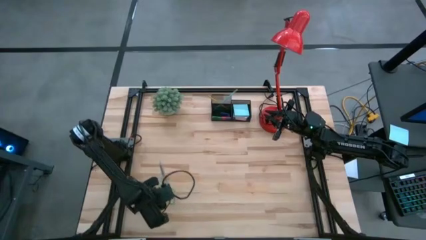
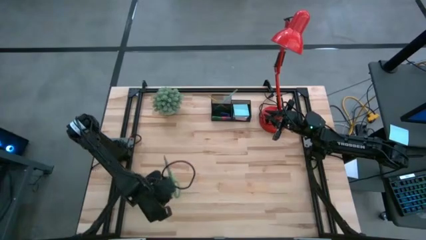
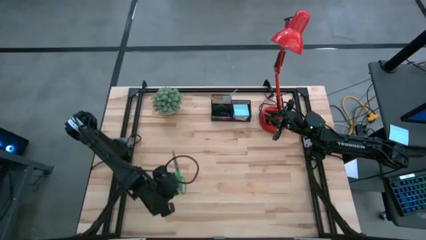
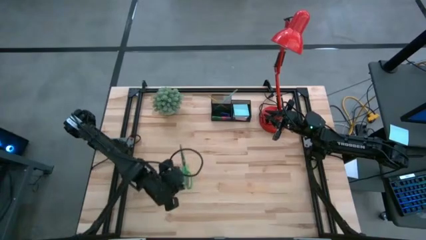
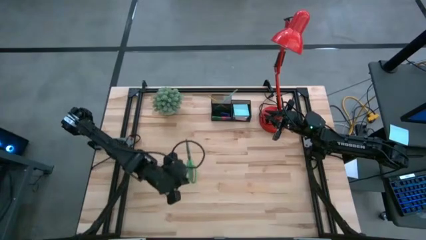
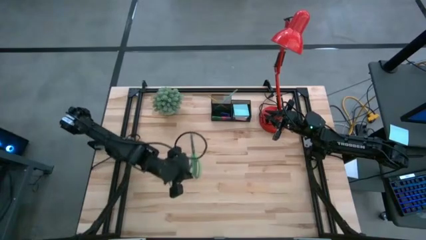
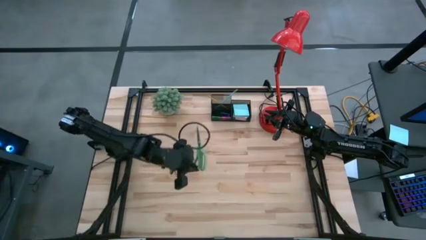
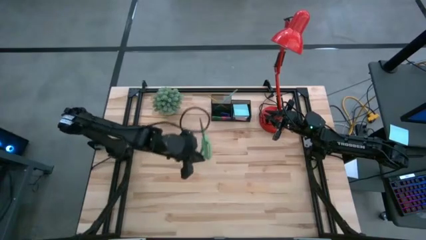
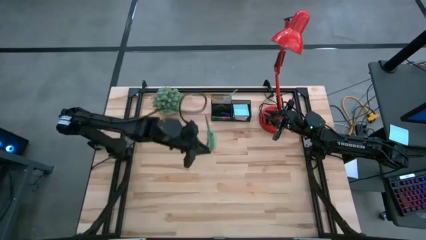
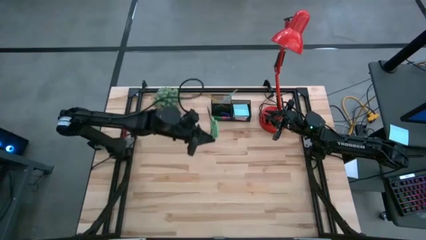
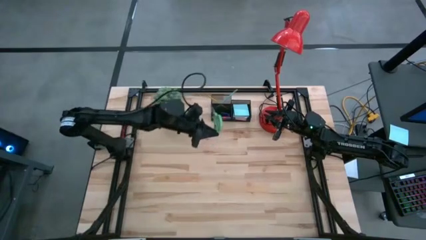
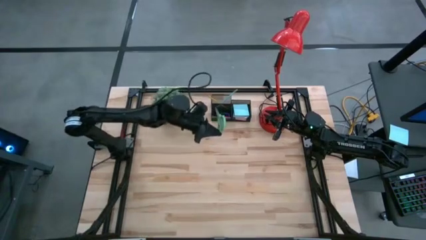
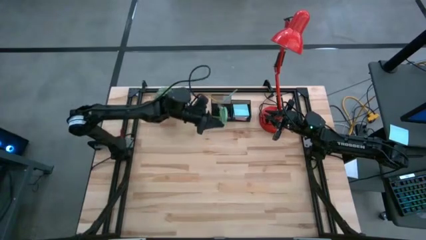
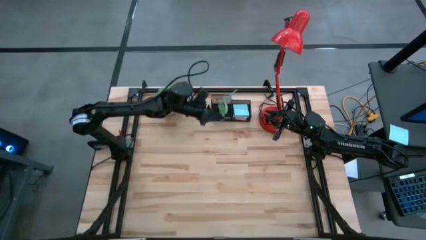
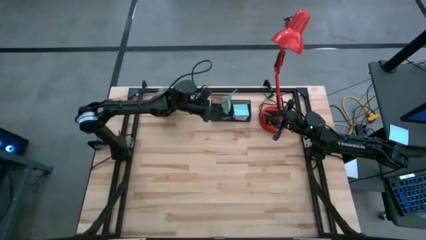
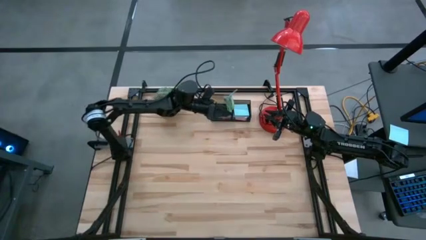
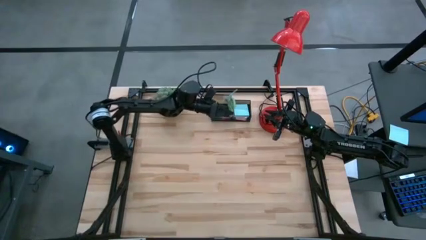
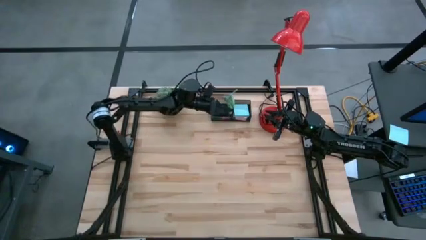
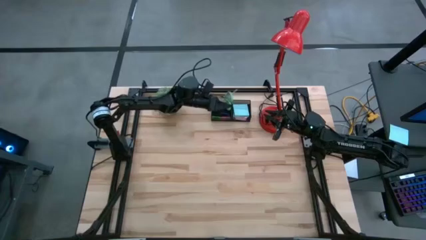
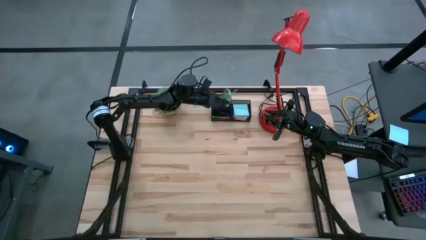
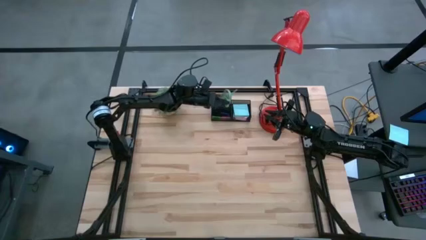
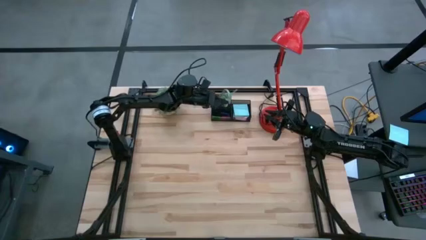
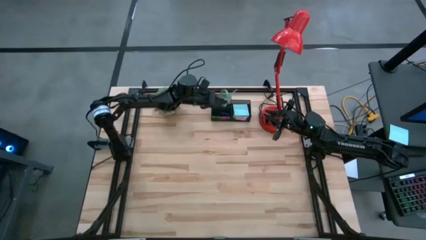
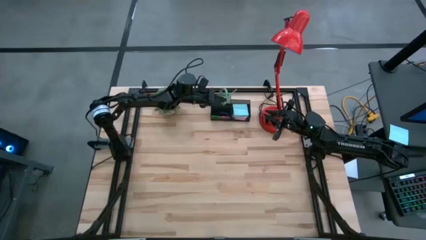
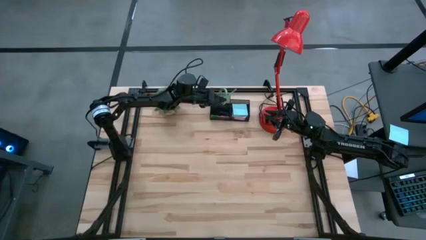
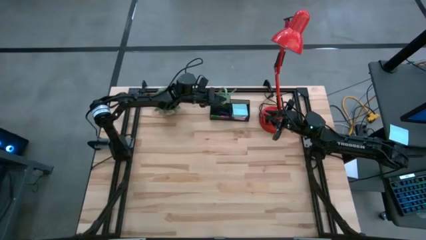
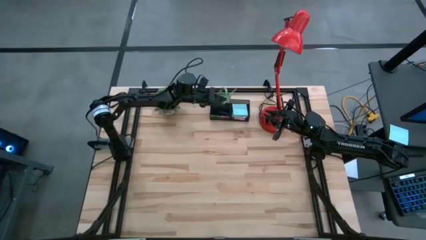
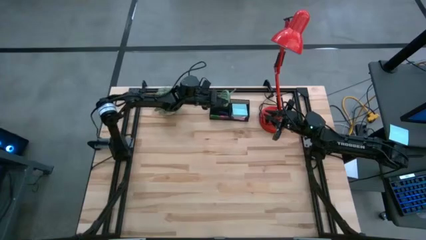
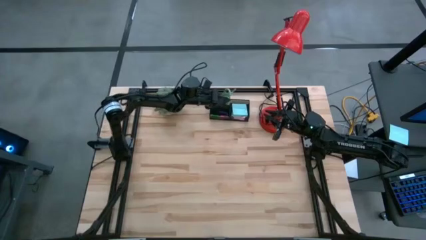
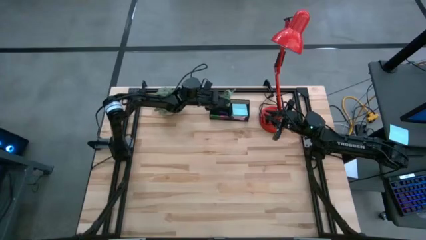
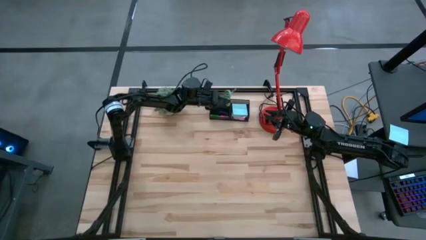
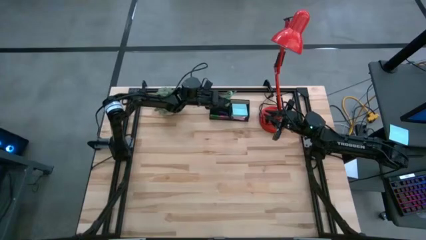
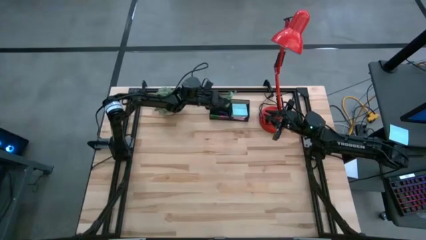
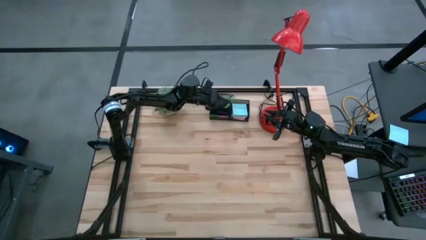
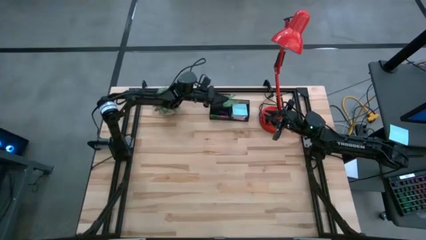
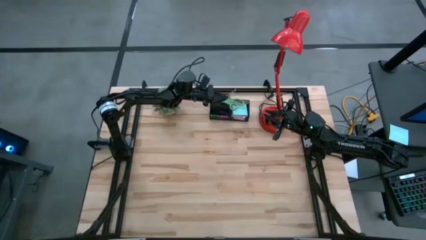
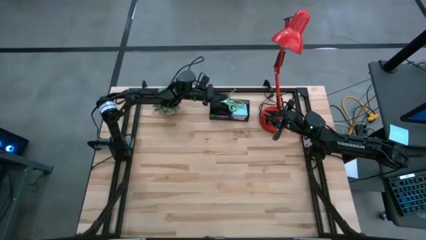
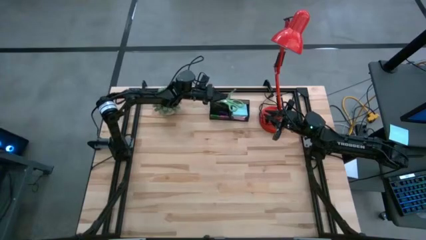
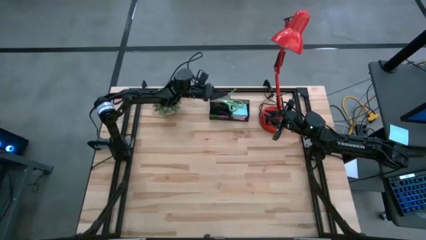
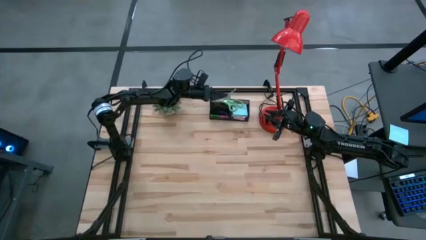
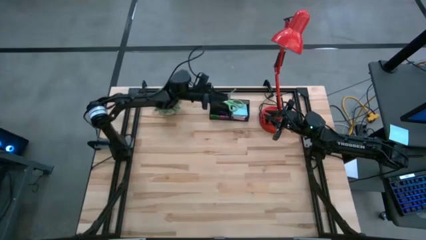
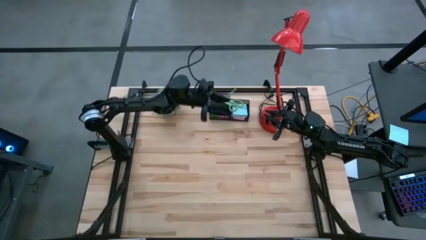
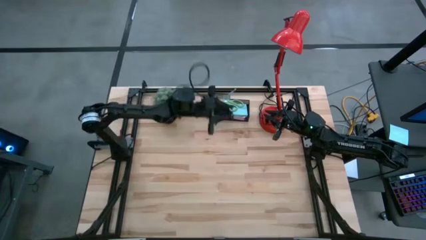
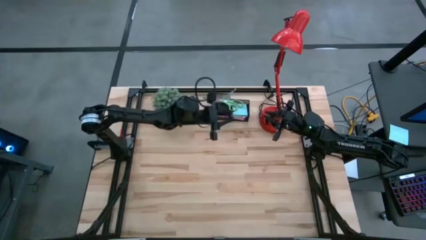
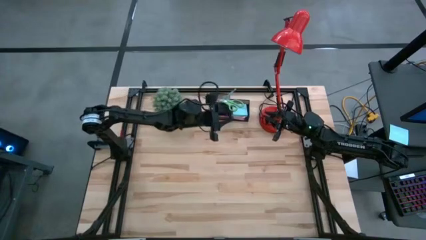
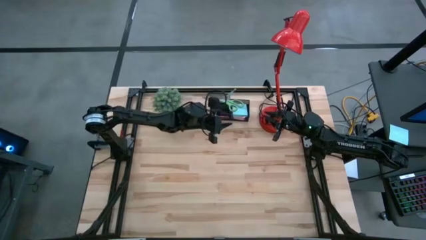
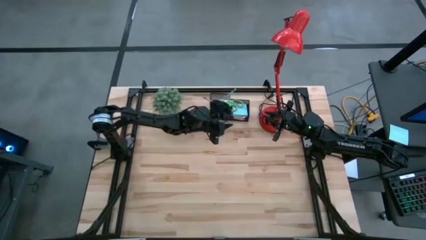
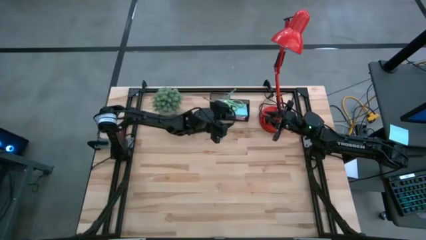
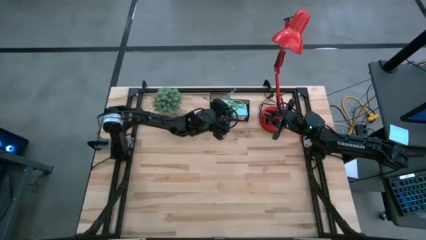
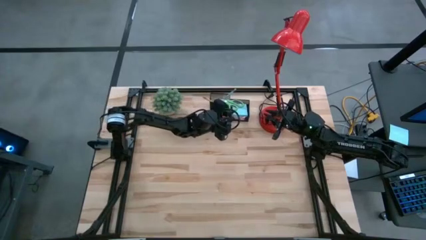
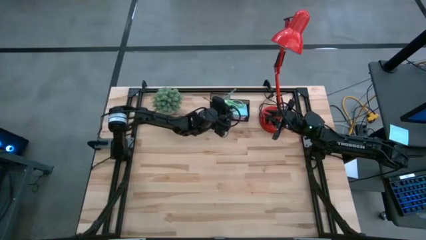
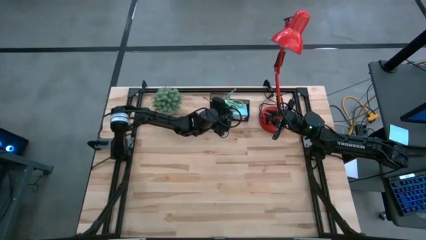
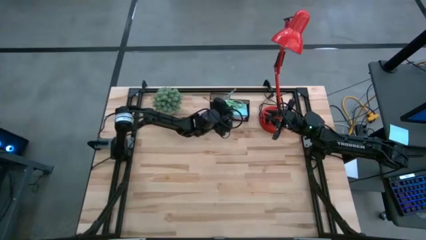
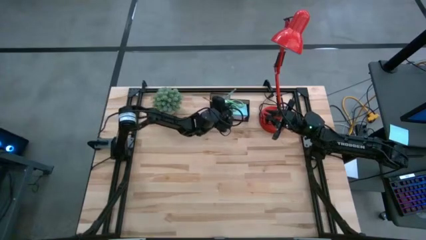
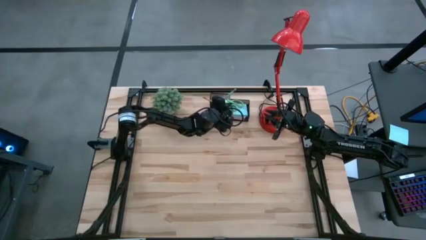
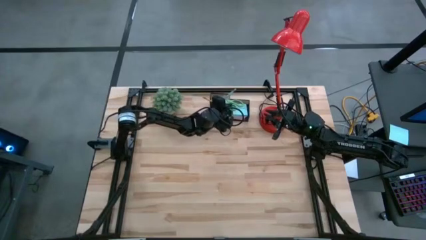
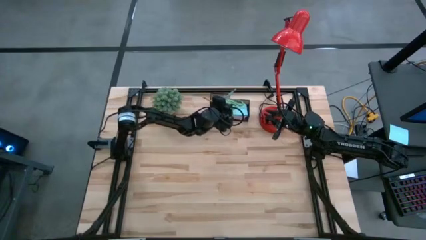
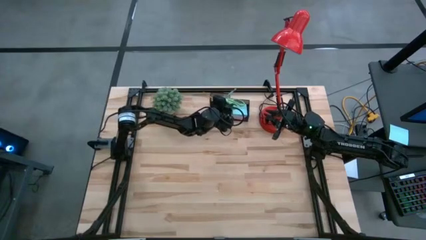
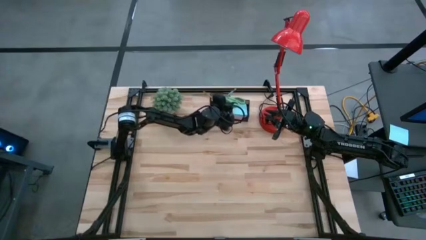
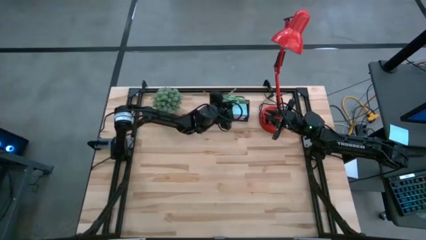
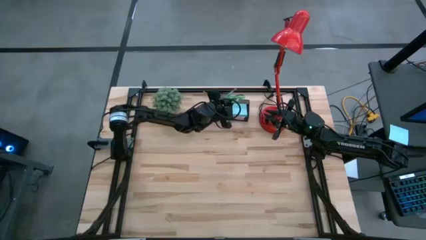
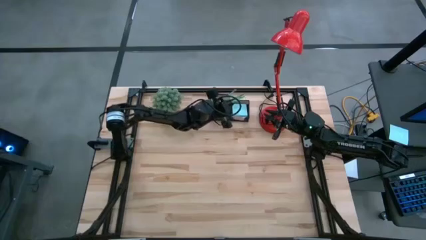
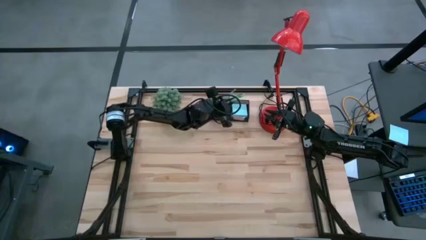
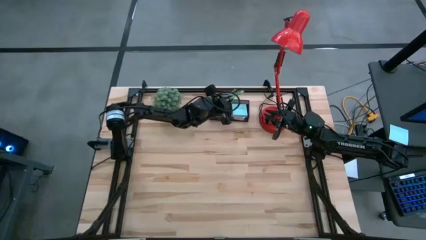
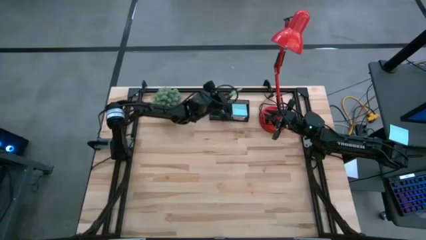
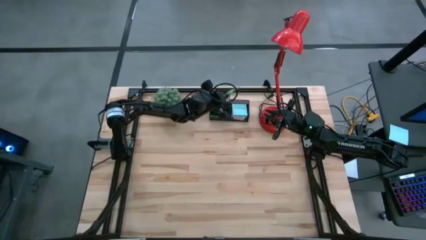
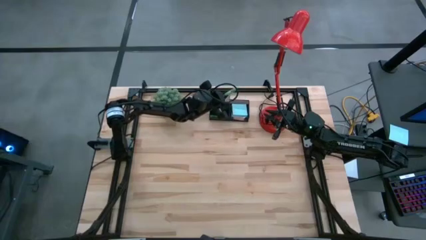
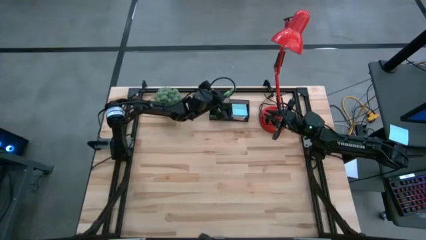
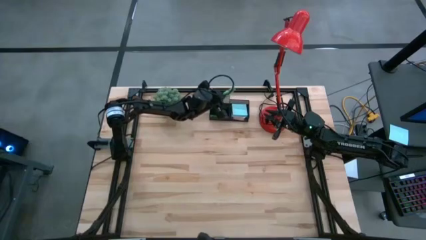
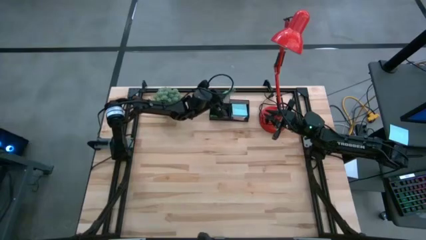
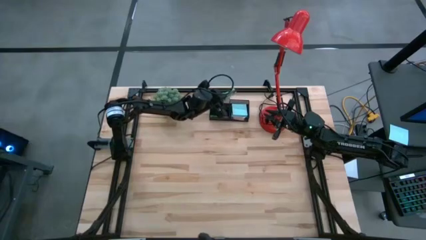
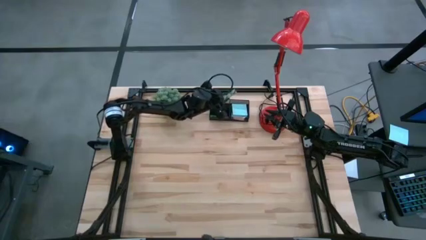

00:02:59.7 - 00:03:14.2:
Task: Pick and place office supplies into organizer
Put the green scissors into the desk organizer
